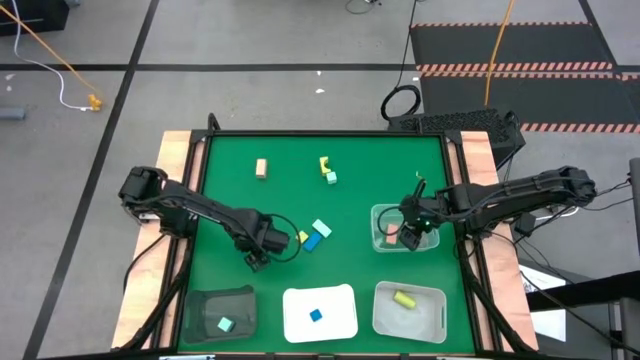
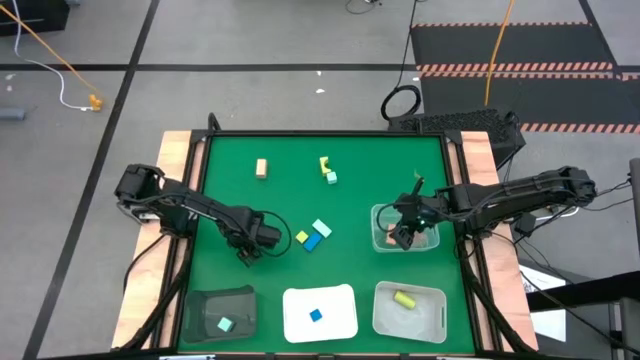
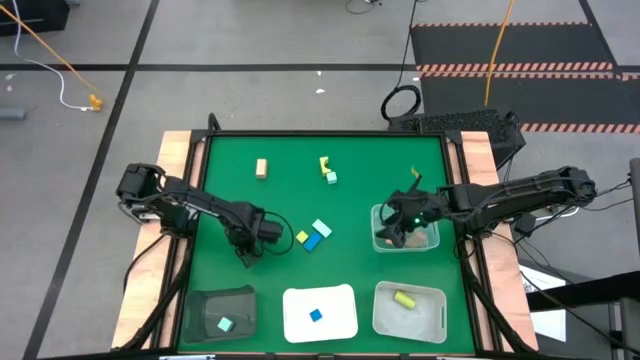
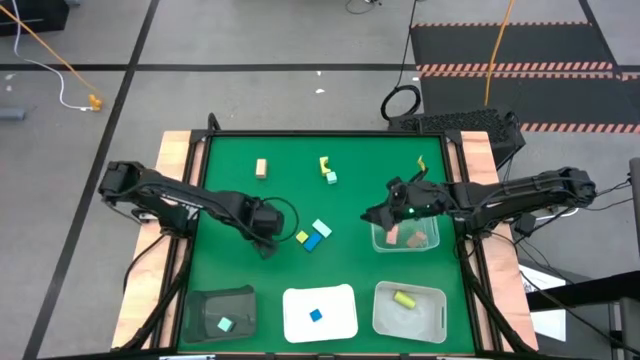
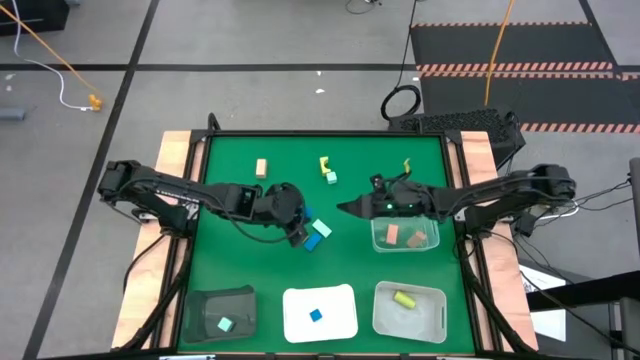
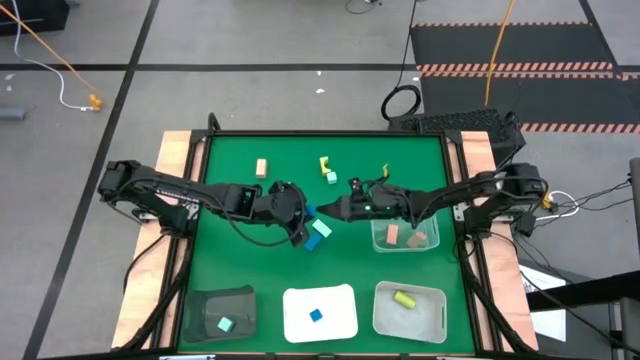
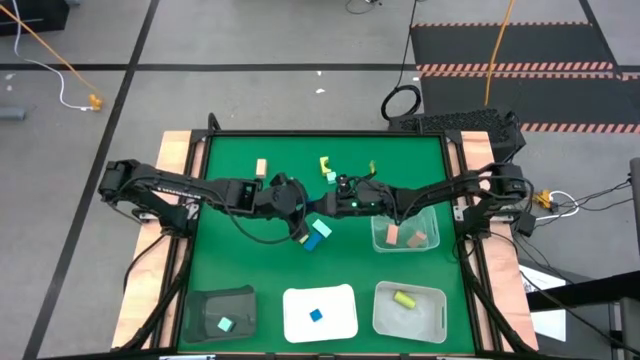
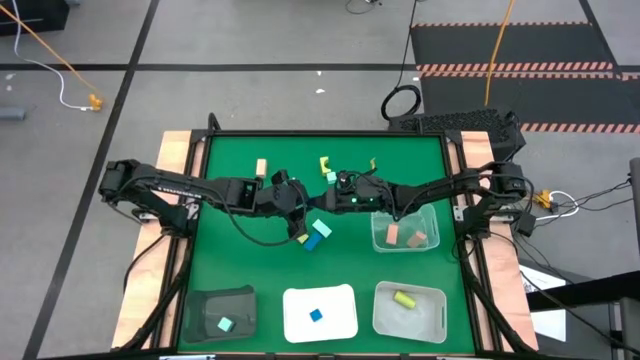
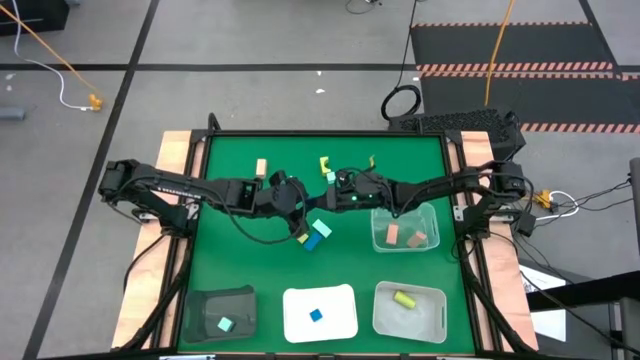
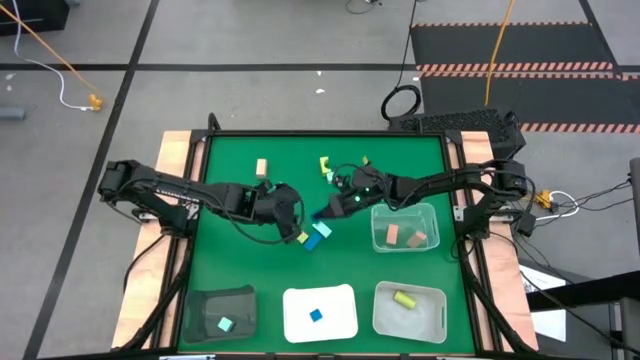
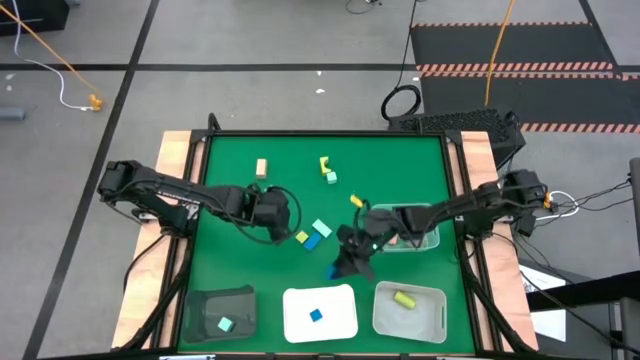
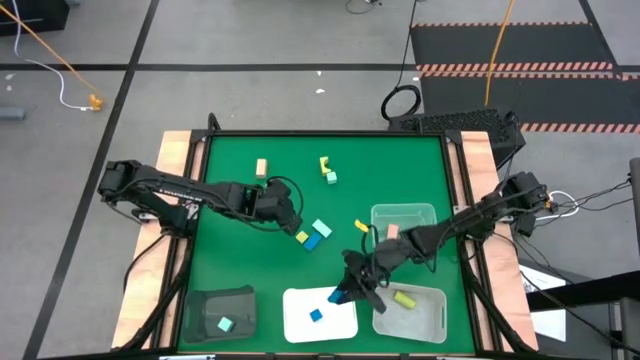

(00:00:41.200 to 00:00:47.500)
Task: Sort & place blocks by color
Put the left blue small block into the white bin

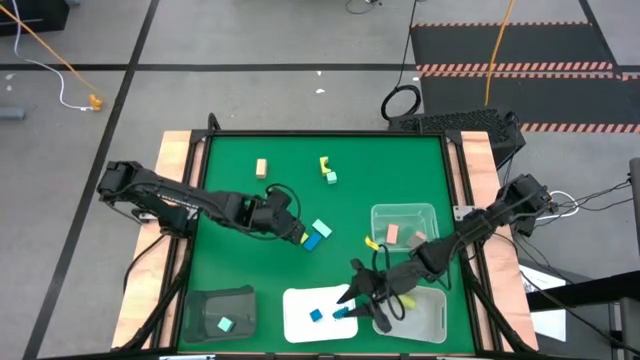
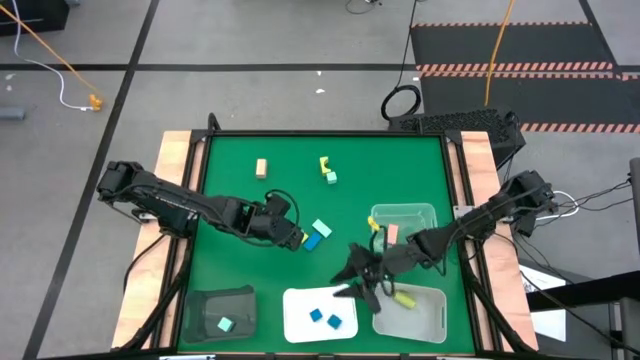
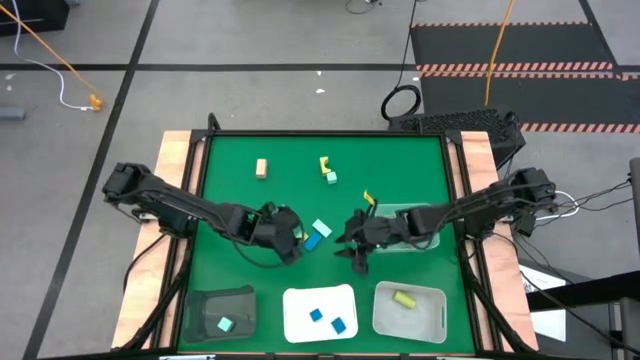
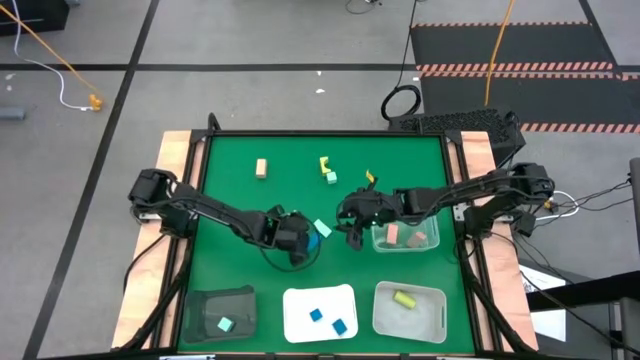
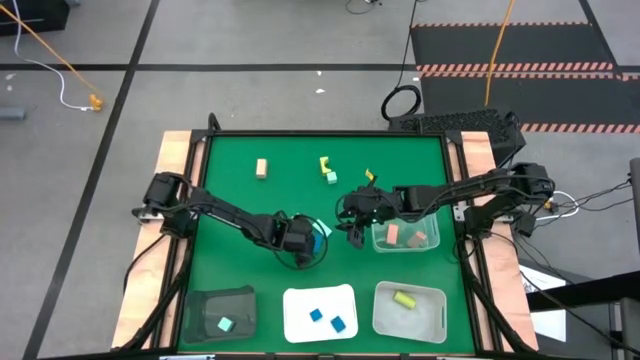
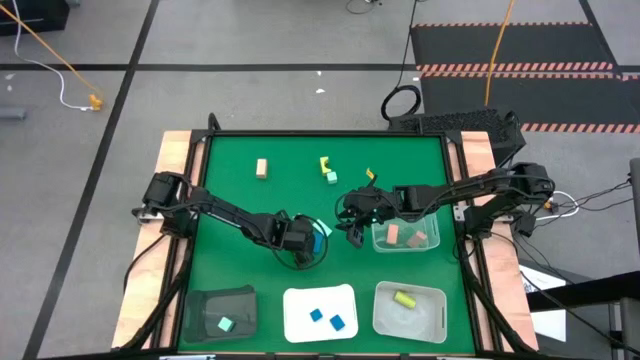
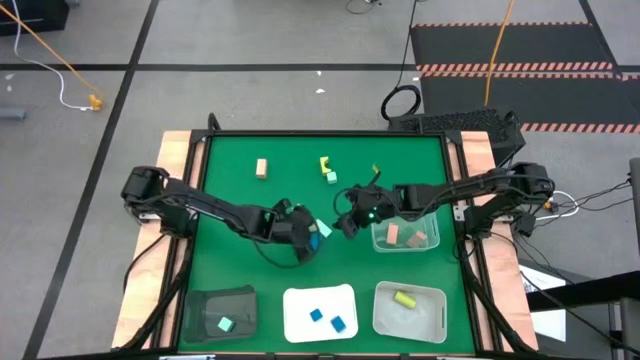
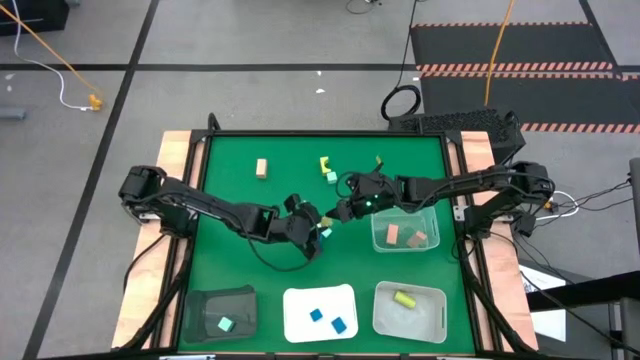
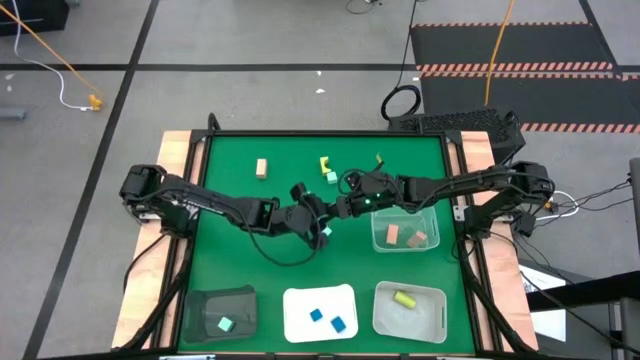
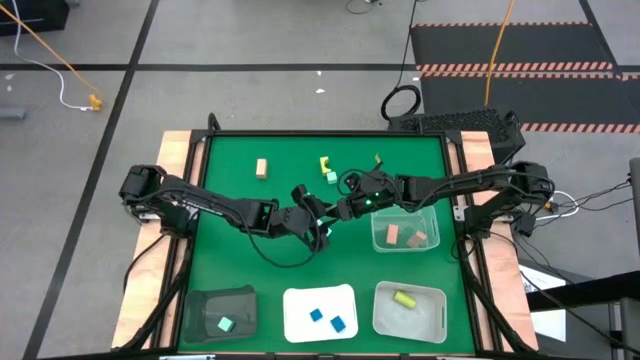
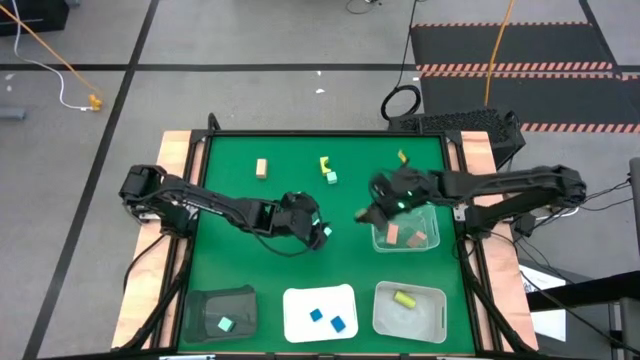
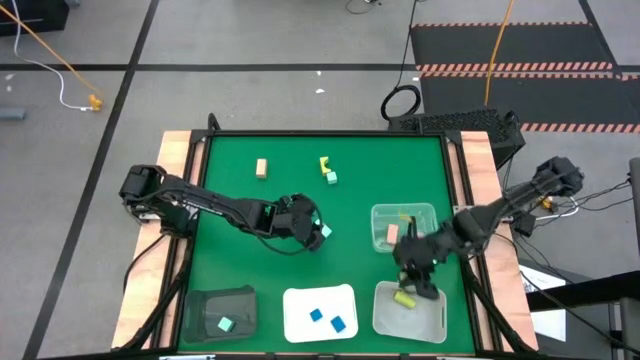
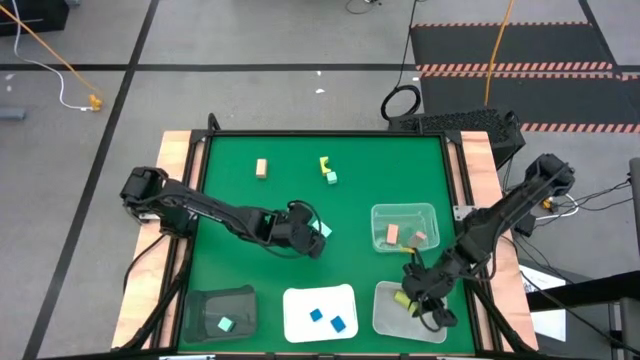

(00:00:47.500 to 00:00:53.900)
Put the bottom green block into the gray bin

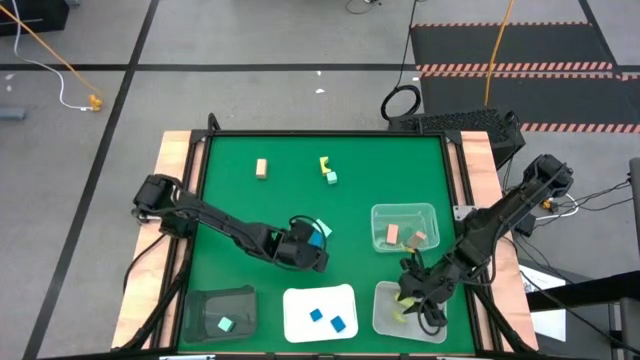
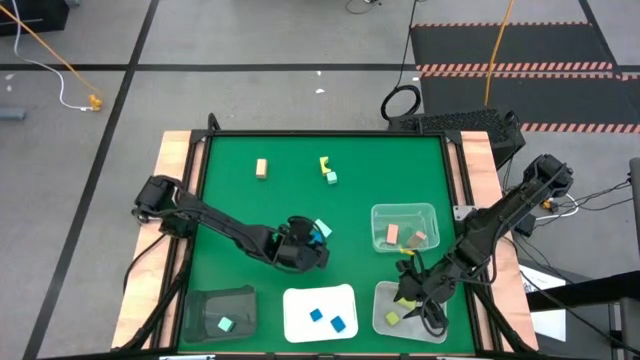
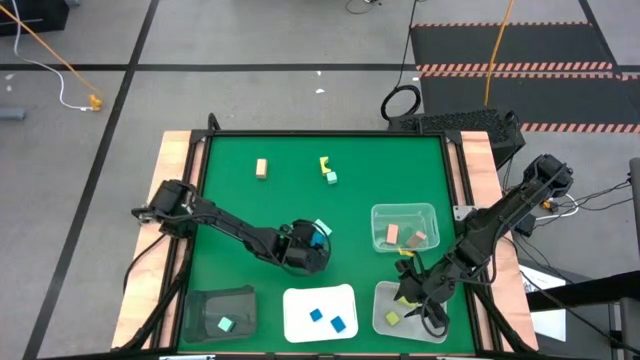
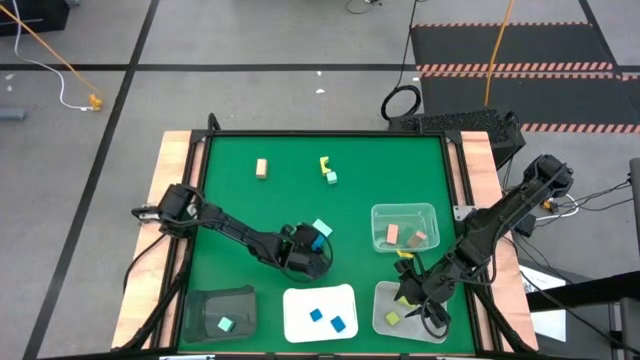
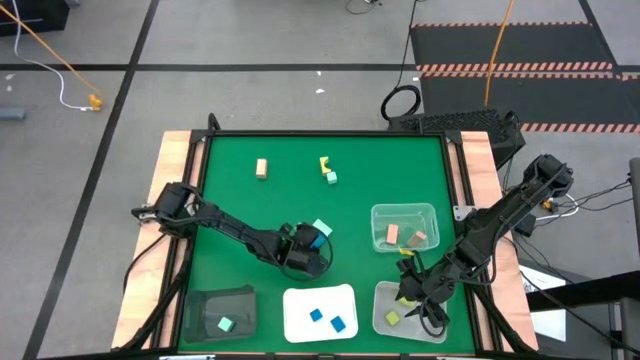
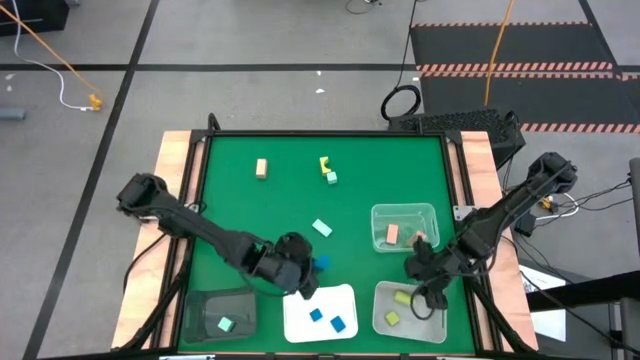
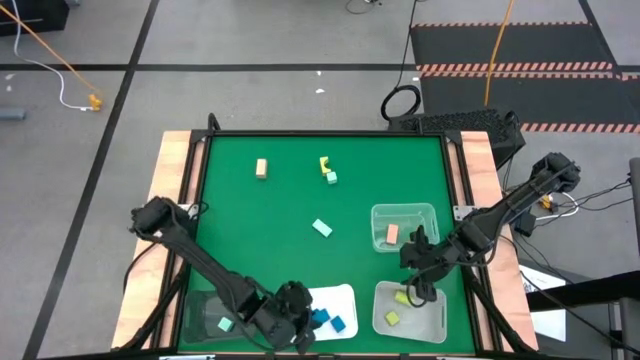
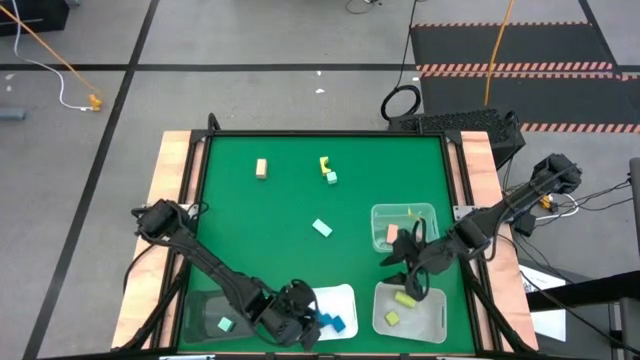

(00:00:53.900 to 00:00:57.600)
Put the blue block into the white bin

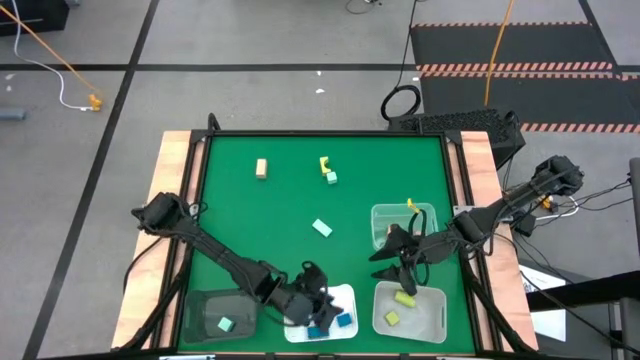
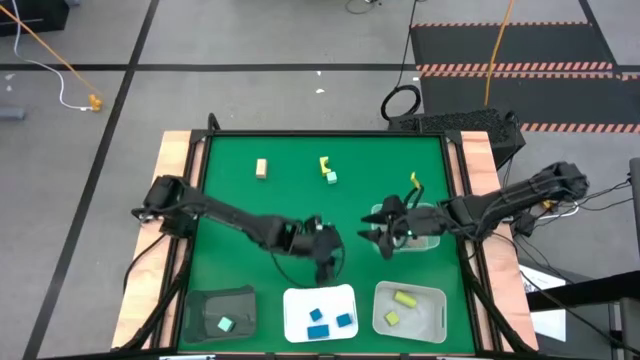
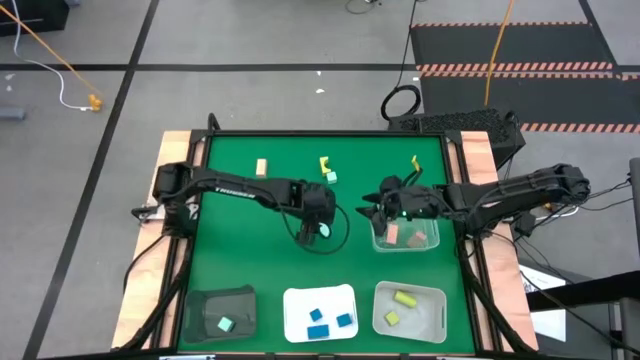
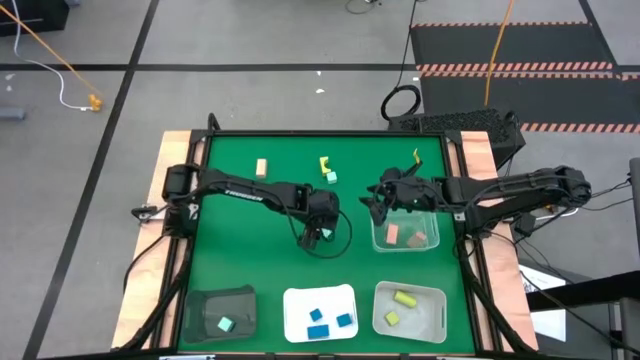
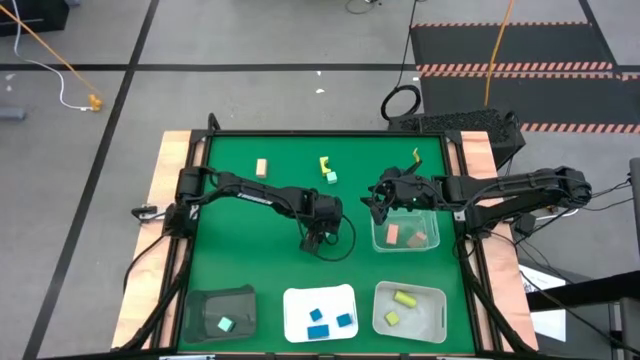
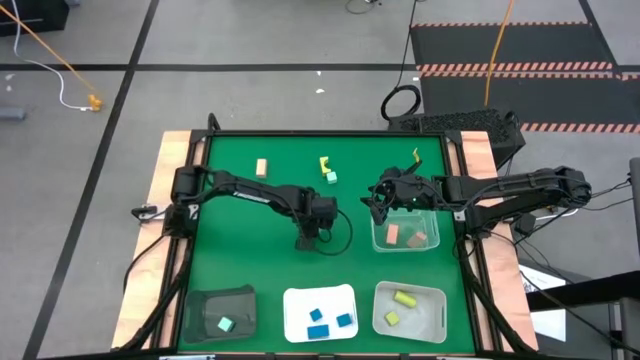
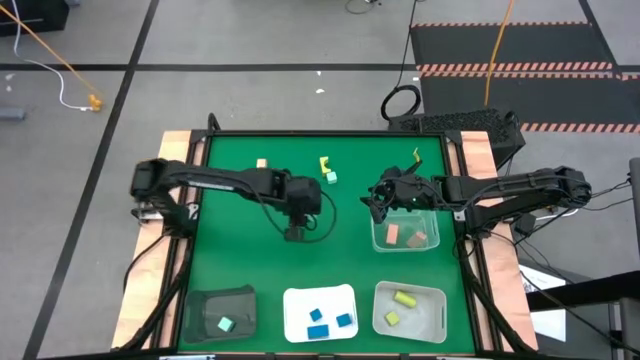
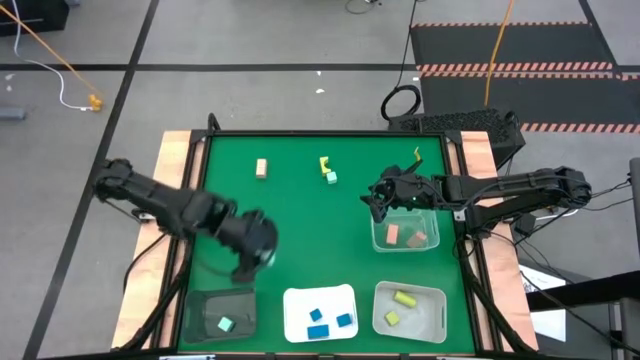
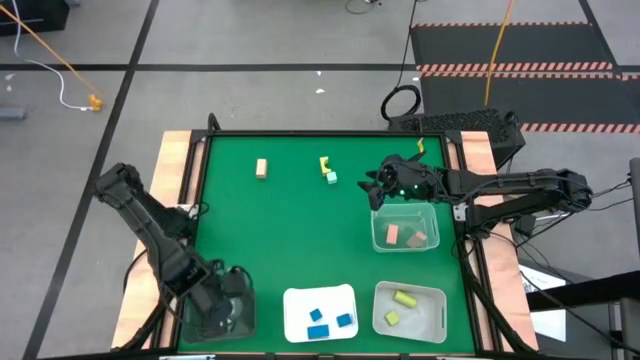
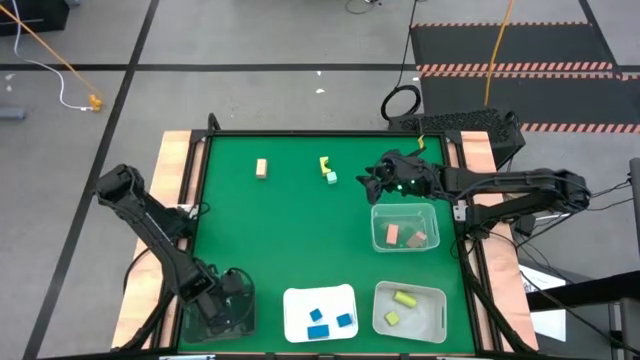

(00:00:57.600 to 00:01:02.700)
Put the bottom light blue block into the black bin
